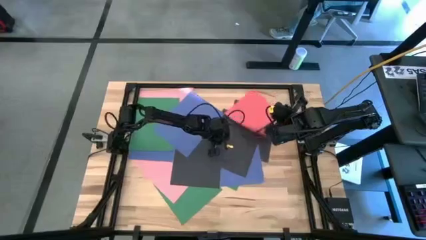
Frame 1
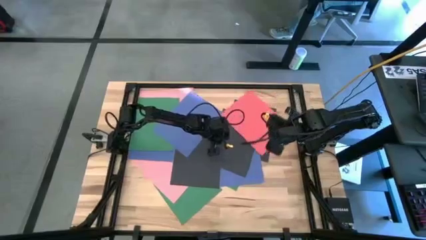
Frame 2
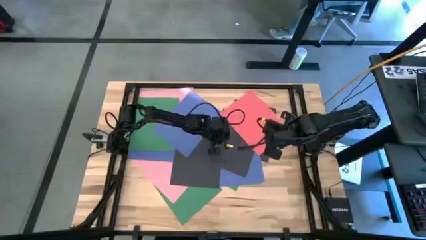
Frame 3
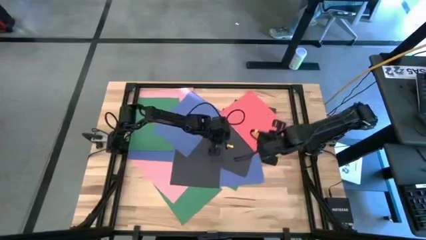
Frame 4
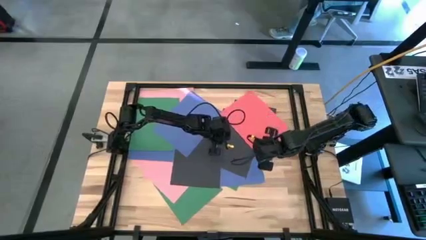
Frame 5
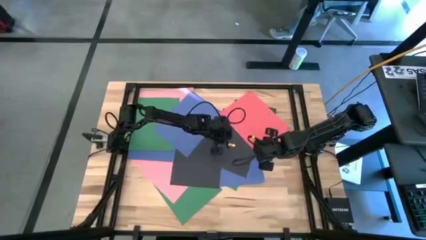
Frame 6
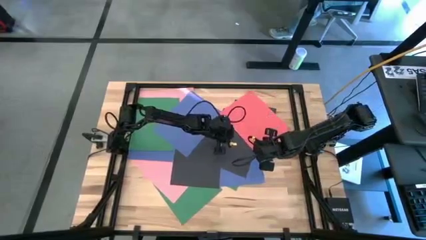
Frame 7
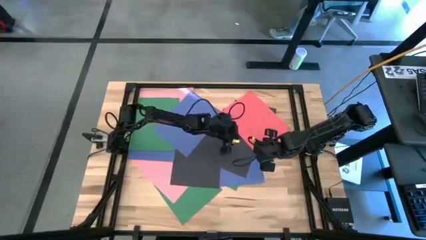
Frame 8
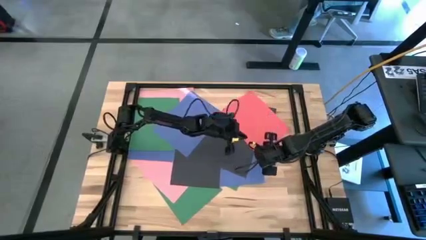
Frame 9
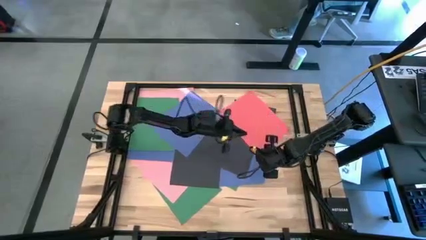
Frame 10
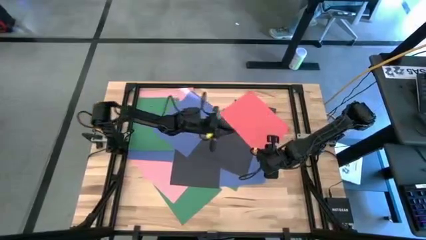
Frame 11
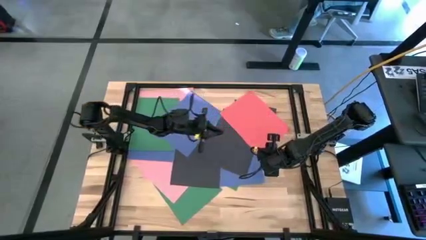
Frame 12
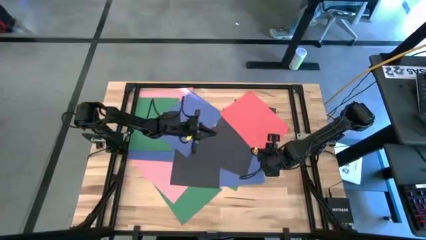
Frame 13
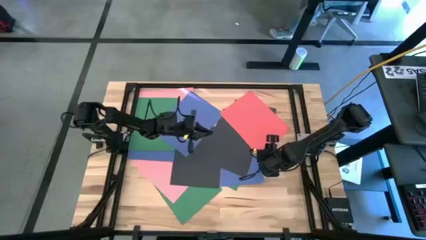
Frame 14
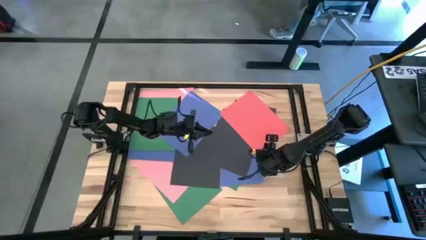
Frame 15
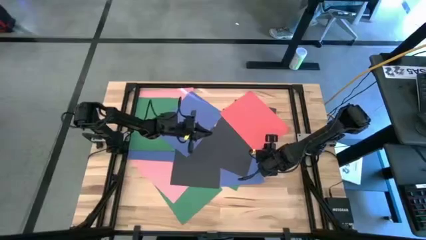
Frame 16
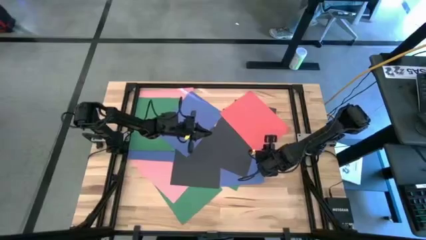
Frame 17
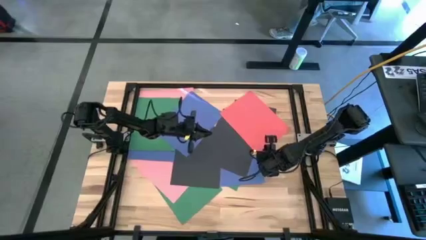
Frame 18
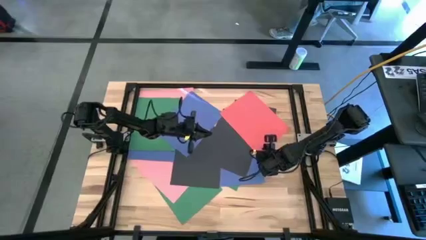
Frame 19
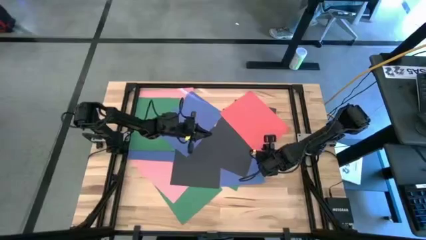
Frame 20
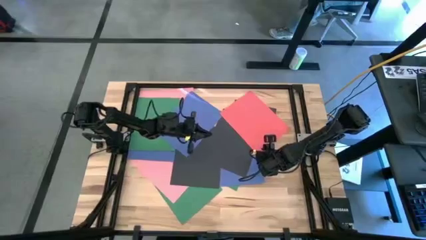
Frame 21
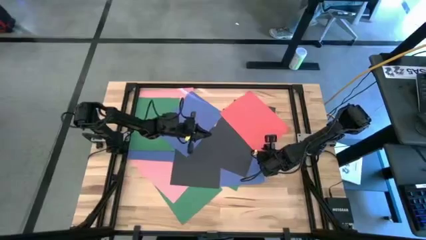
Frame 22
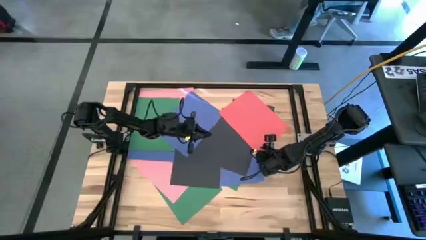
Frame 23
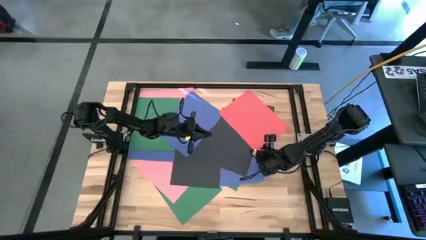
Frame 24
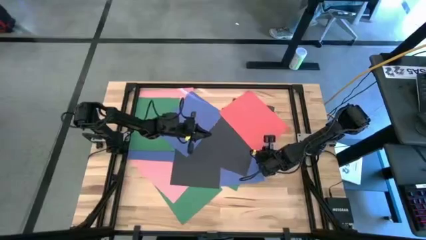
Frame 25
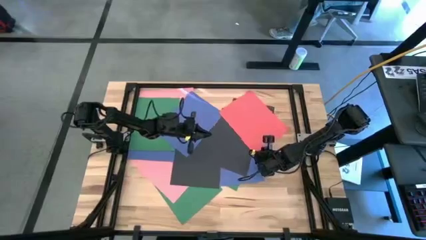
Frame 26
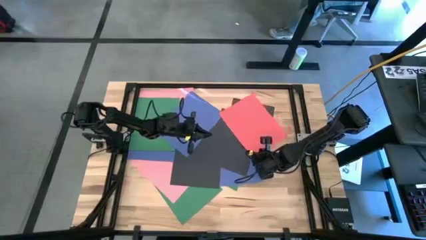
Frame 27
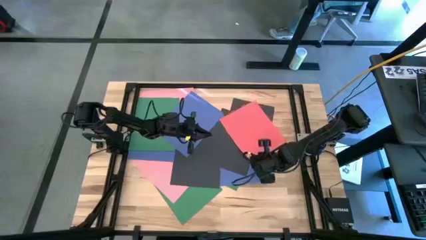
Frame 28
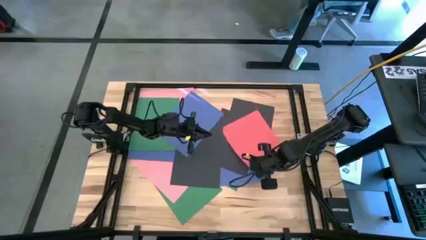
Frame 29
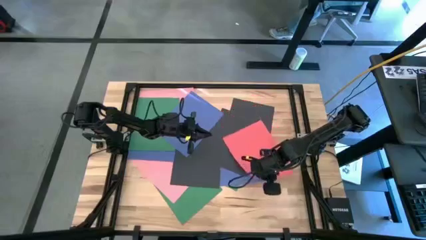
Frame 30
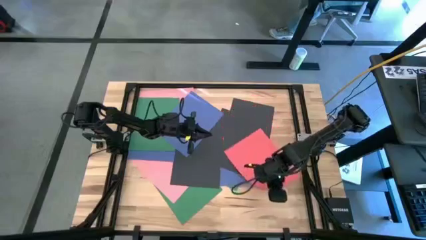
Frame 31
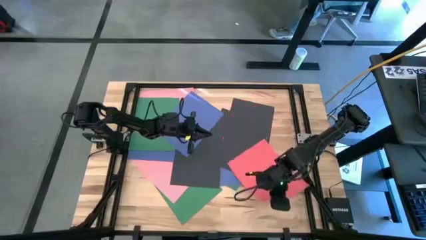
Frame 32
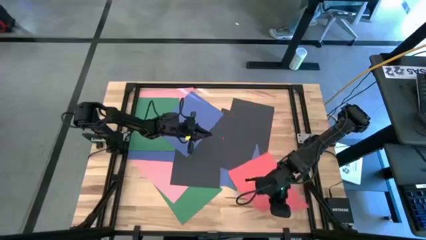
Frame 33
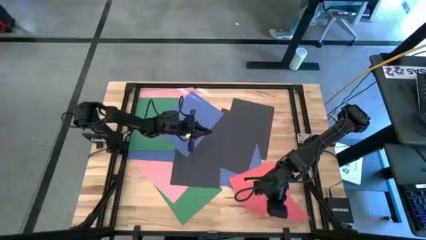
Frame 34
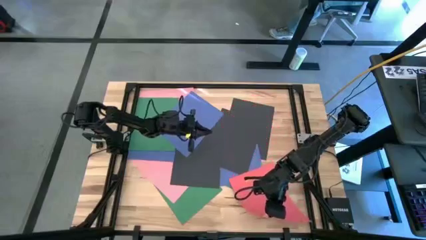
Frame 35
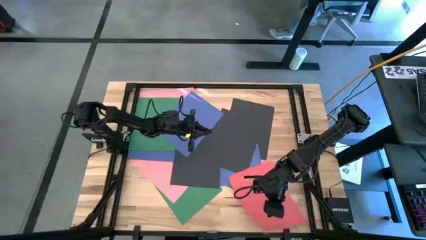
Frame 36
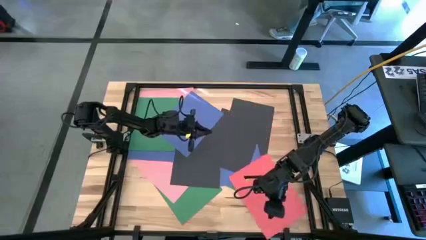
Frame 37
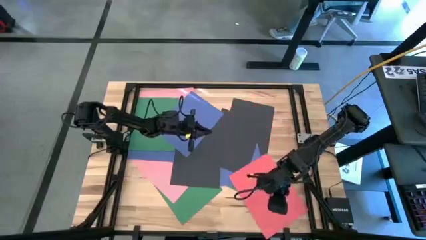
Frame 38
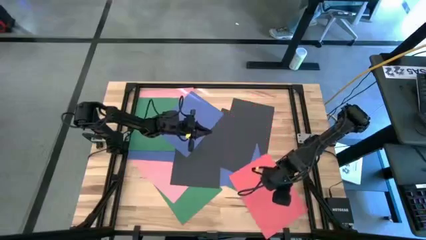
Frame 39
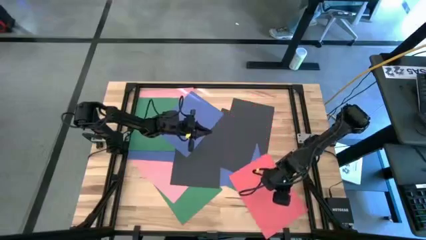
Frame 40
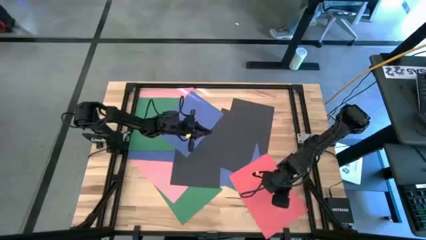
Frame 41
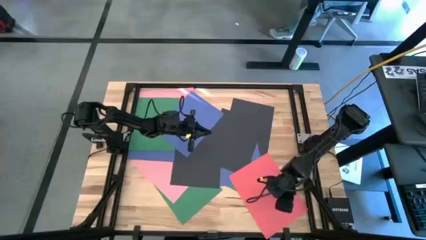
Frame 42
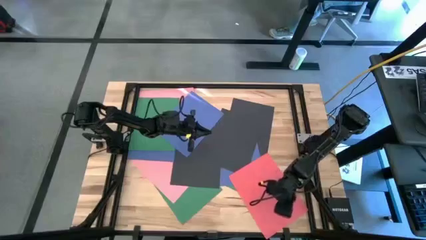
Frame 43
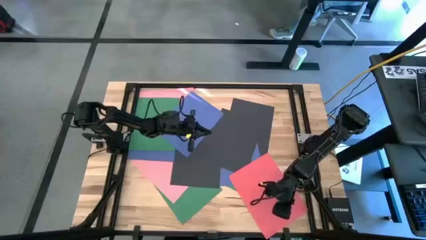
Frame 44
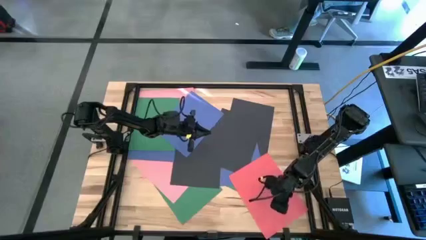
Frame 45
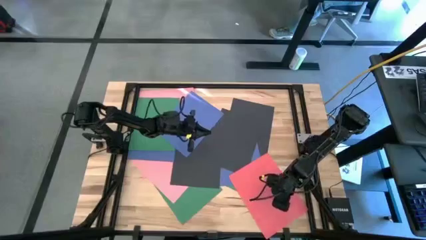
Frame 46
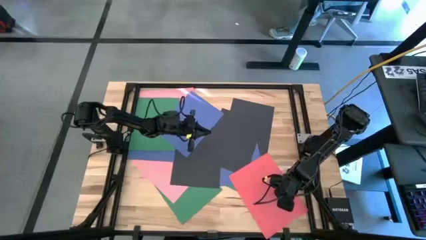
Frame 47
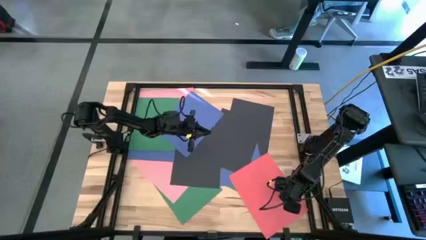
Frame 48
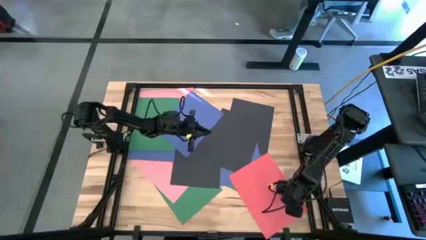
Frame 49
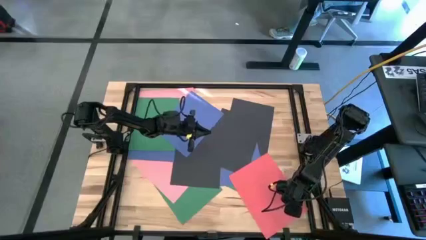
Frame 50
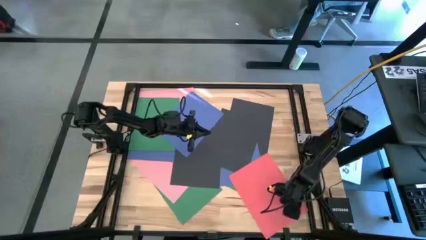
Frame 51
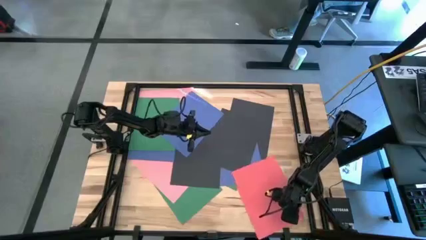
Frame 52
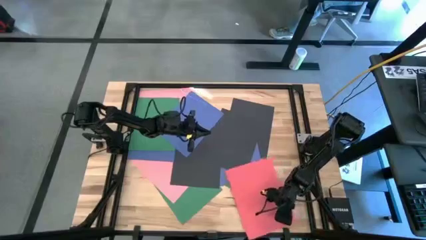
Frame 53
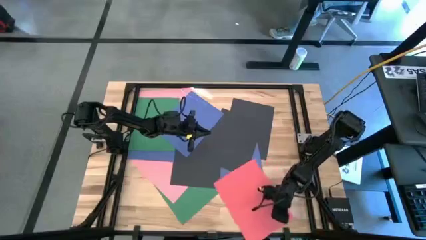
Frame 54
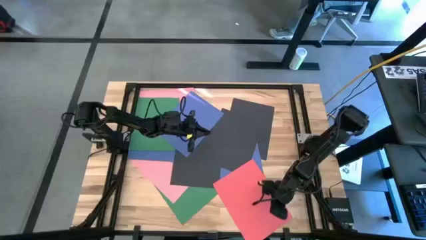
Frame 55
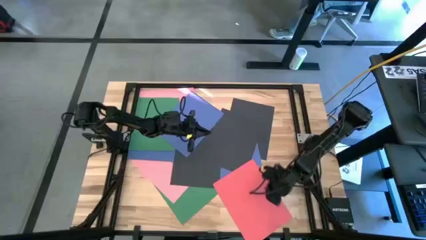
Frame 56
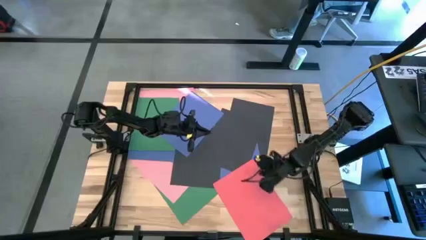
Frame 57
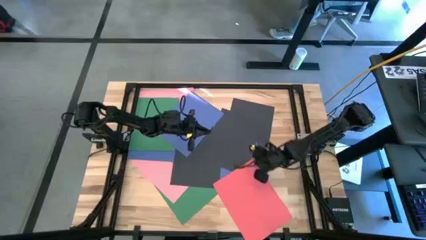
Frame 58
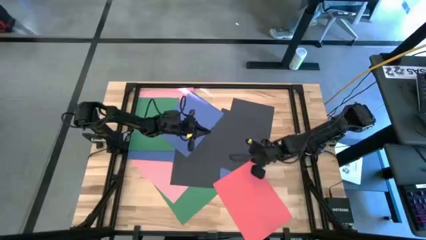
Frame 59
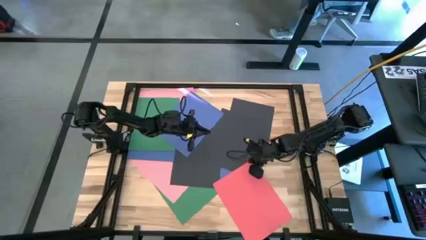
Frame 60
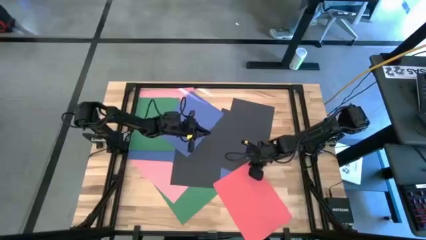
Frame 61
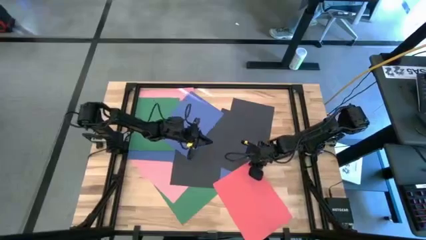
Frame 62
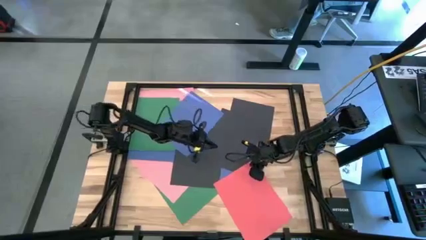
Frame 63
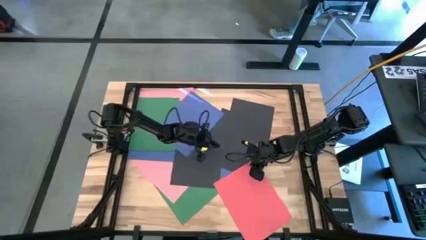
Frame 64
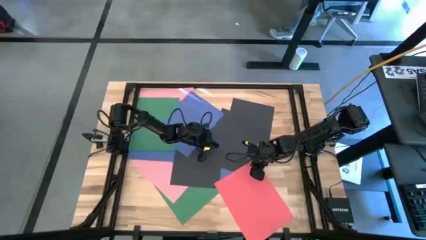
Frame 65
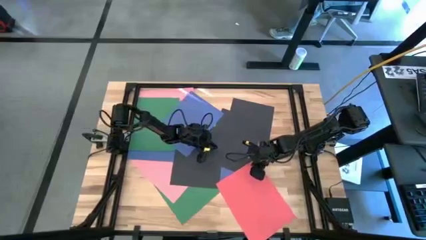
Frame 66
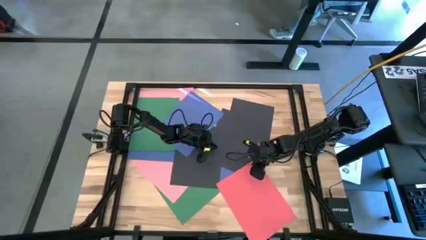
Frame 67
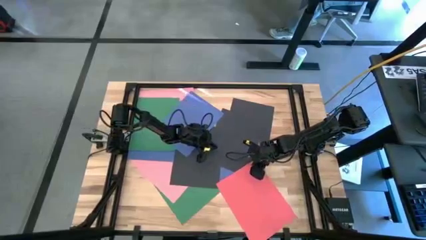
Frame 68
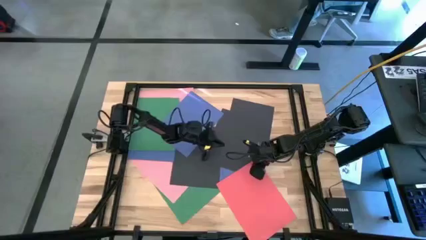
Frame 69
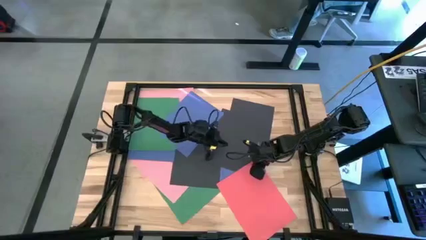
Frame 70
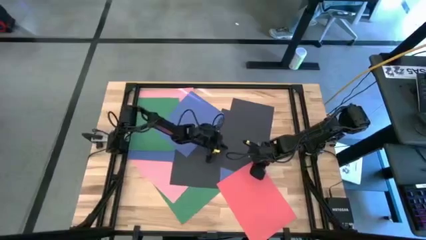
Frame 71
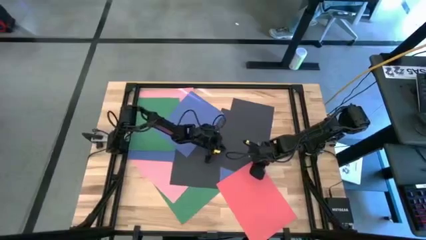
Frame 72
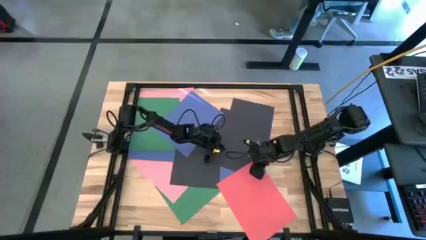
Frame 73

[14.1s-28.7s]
Task: Organize paper
Move the red paper to the bottom right of the table

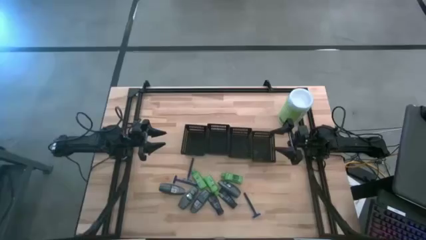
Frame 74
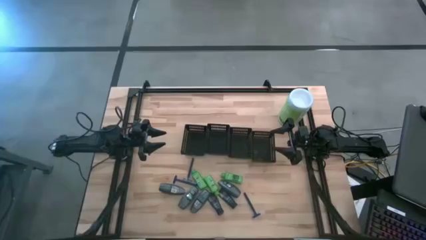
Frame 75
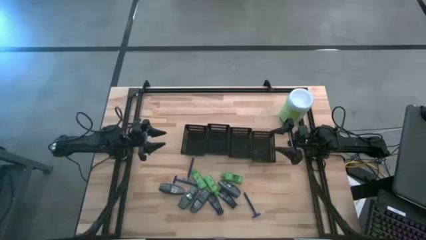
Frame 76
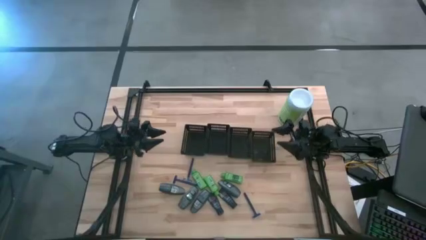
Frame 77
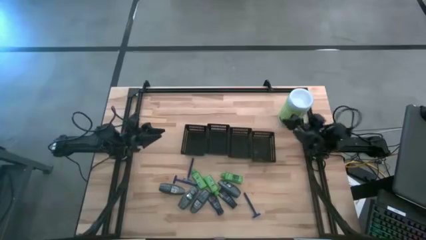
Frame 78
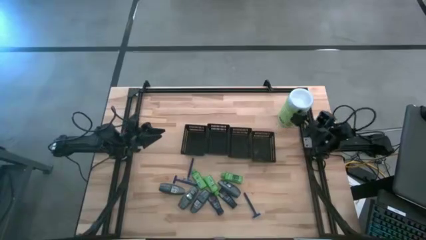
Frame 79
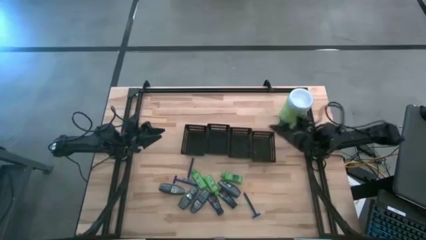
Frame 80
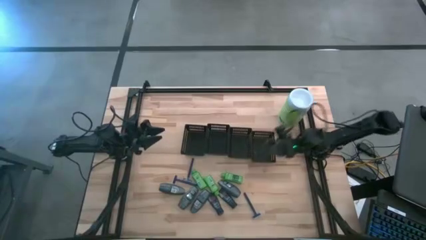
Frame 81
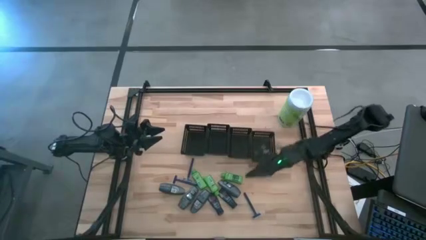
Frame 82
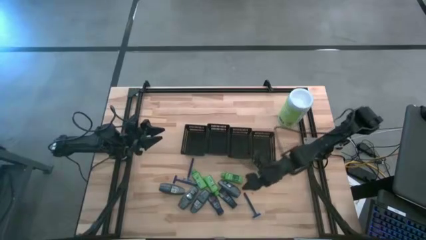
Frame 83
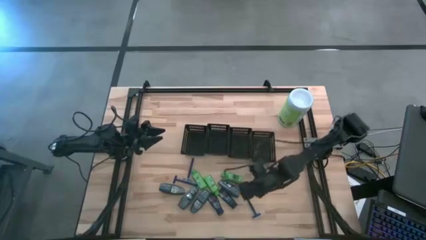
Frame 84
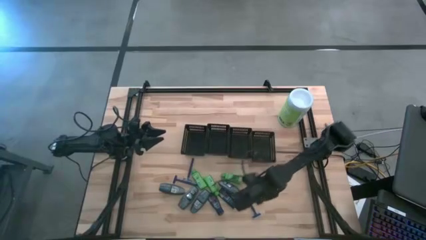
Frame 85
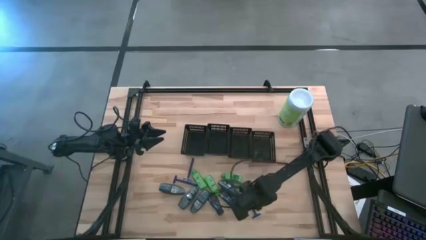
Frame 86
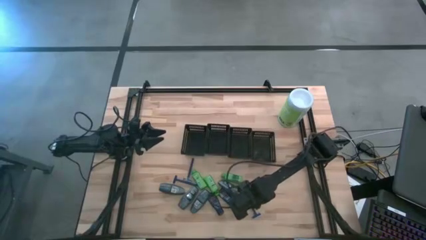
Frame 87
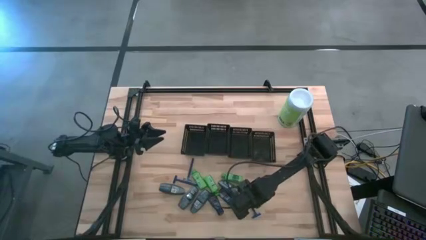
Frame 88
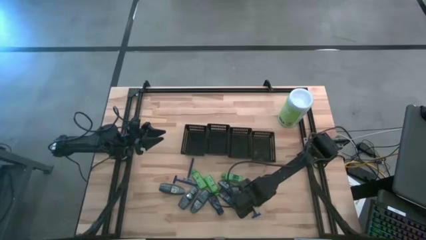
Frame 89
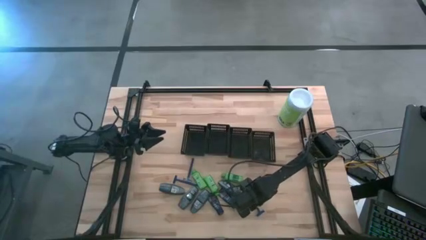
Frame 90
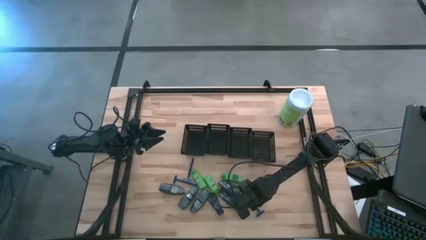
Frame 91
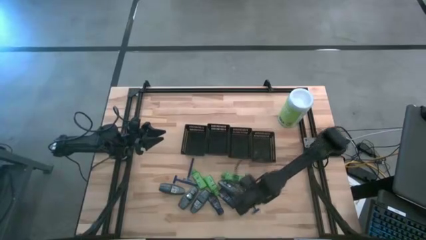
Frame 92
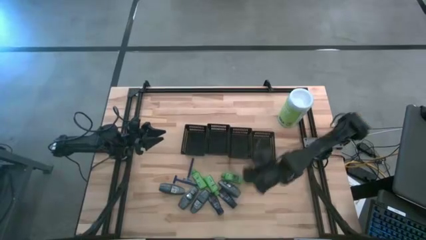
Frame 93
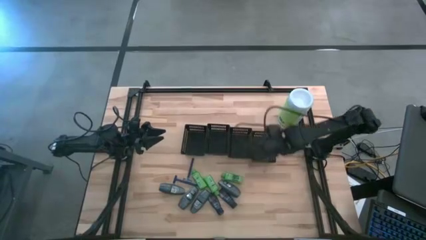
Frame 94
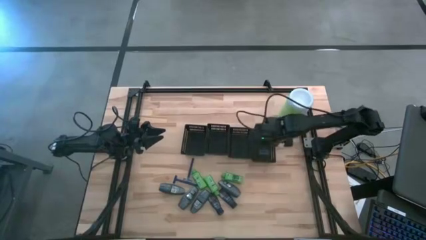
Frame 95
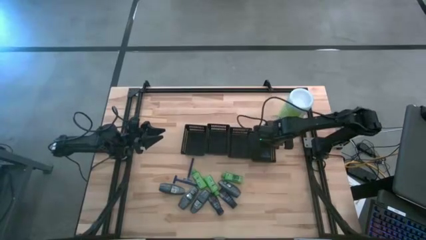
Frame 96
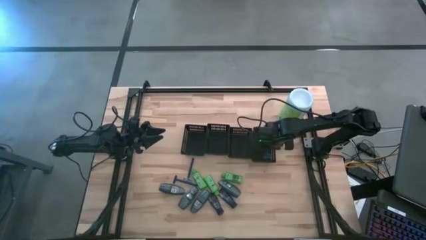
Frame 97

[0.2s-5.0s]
Task: Pick & Place Travel size toiletries
Put the razor into the right black bin
